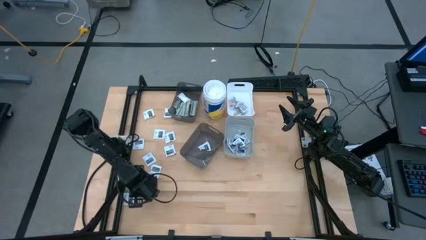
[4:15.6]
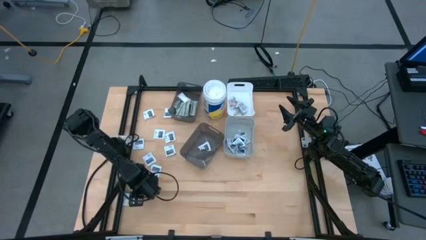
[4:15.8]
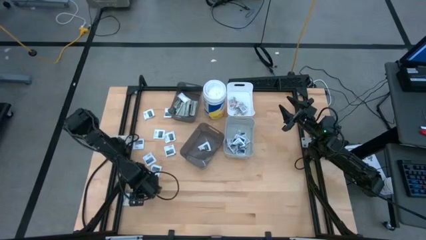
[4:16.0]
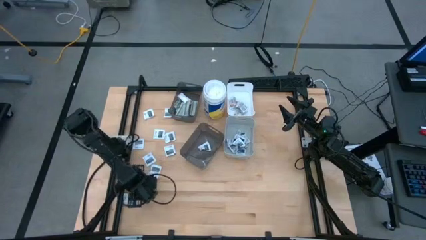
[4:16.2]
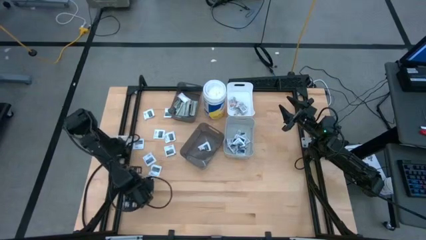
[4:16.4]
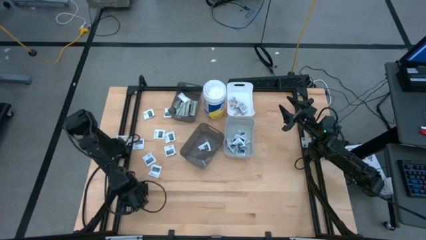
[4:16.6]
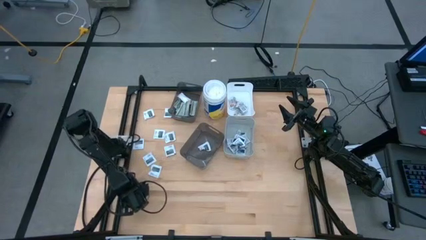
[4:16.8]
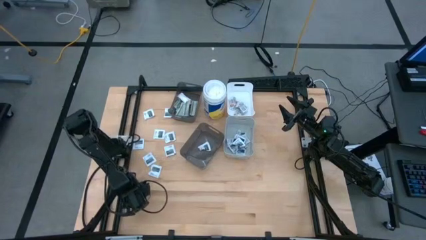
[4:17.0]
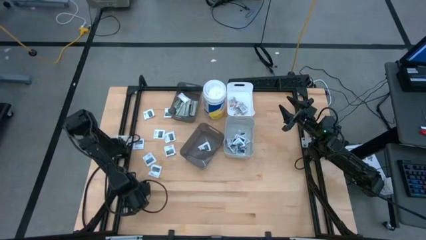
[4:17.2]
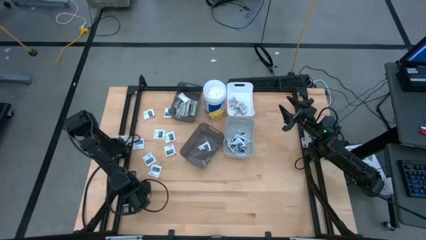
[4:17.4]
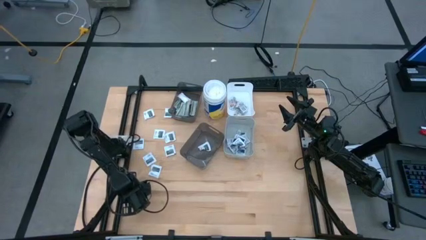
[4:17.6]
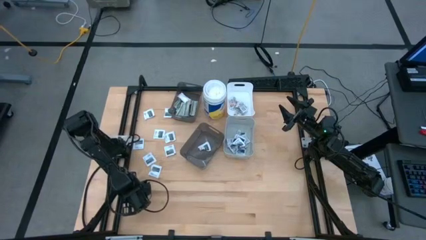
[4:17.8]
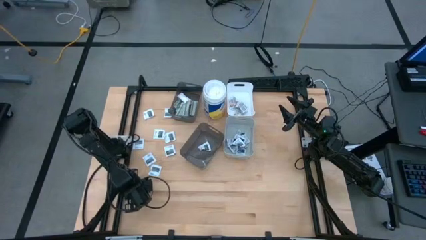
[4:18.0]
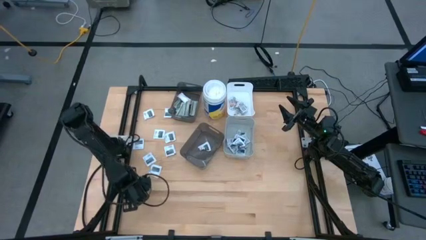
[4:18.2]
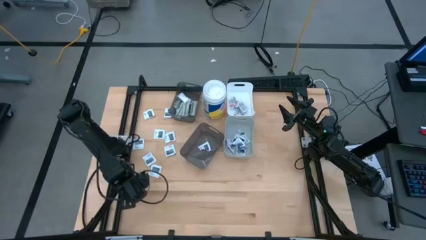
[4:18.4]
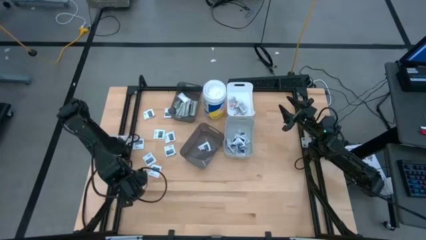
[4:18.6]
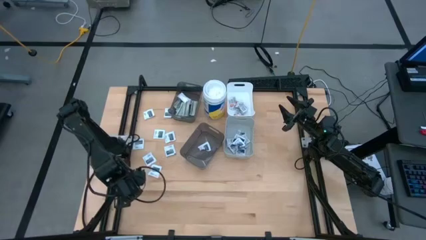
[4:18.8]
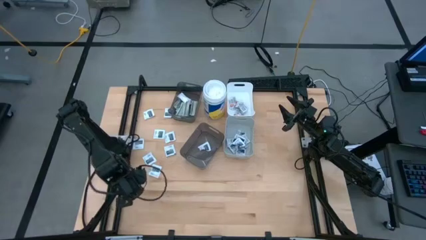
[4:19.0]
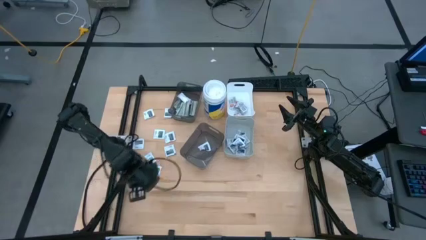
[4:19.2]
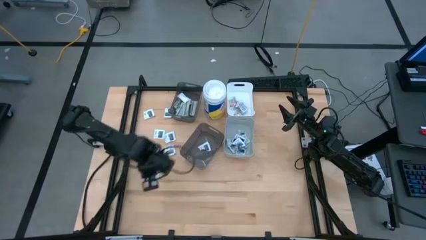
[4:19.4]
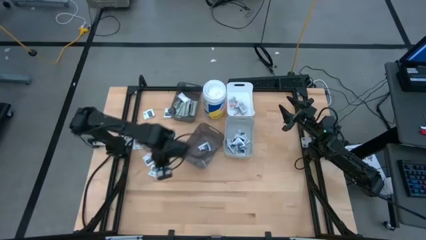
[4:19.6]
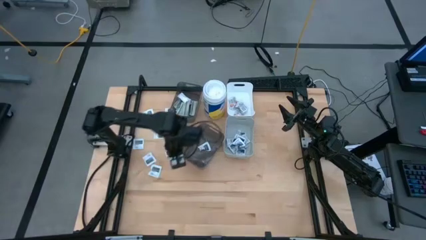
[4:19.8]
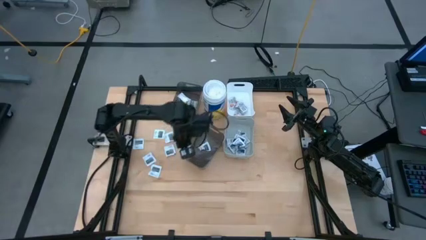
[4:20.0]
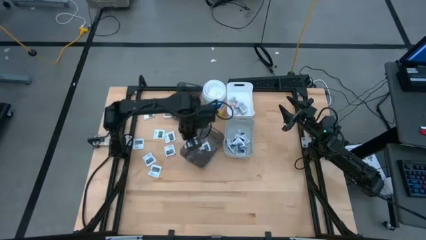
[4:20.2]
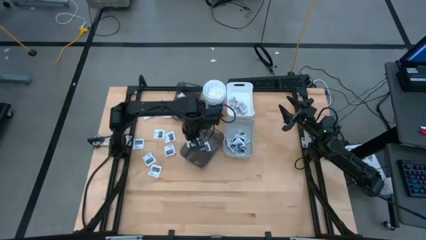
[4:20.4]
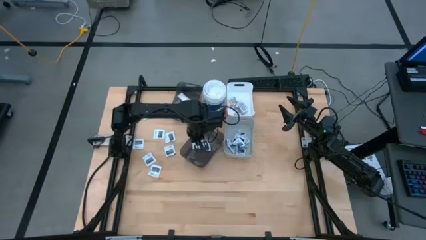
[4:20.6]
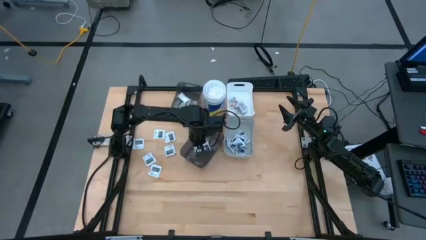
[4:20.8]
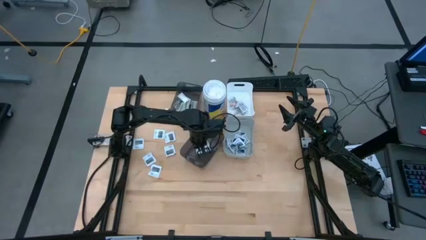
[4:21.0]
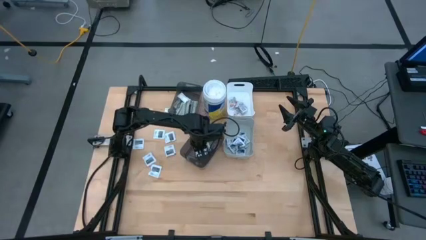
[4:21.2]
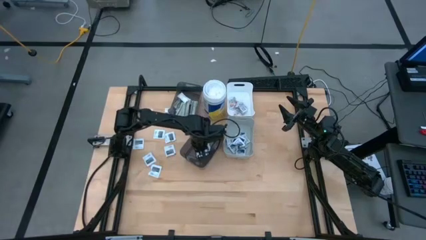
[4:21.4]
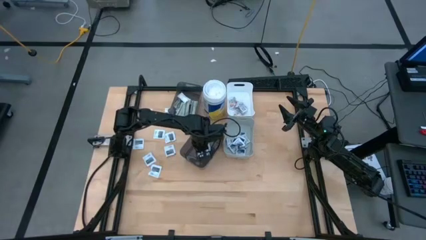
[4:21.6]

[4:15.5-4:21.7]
Task: Pick & Place First Aid Supplies
Put the towelette pack into the bottom black bin

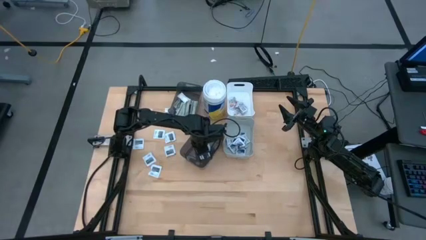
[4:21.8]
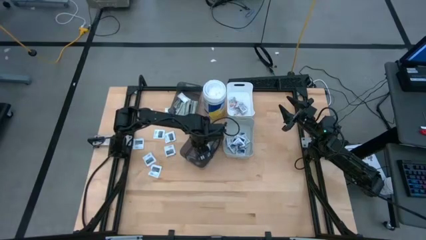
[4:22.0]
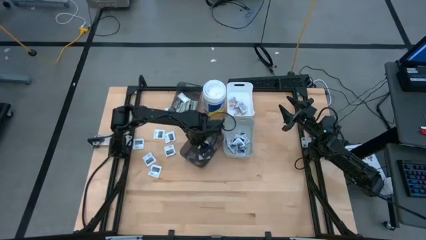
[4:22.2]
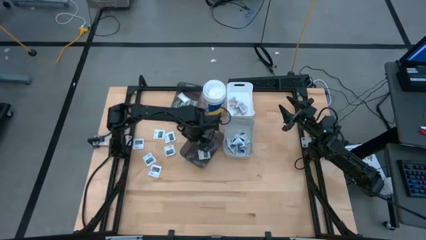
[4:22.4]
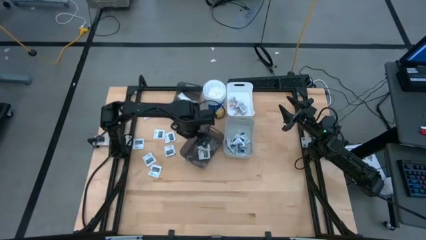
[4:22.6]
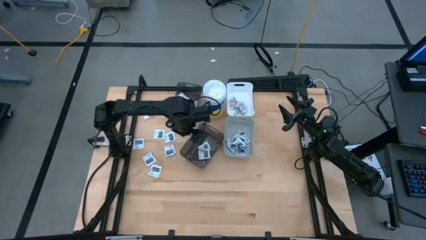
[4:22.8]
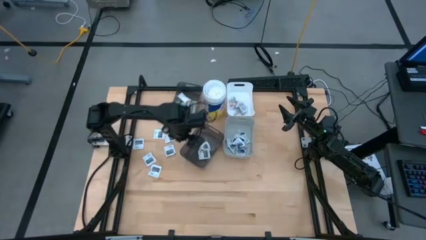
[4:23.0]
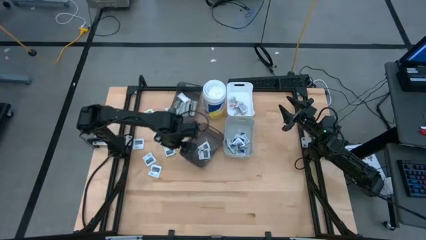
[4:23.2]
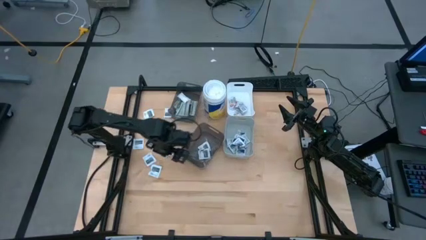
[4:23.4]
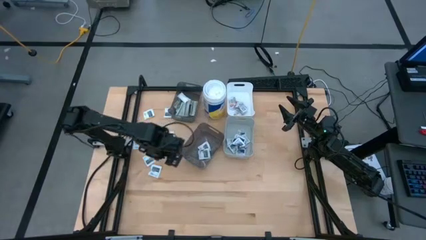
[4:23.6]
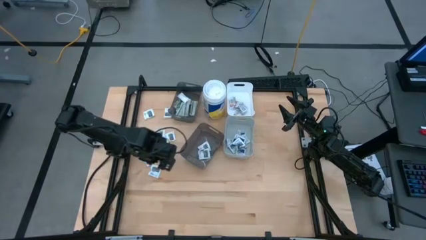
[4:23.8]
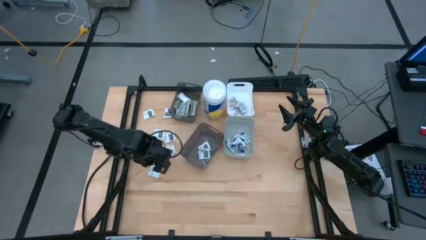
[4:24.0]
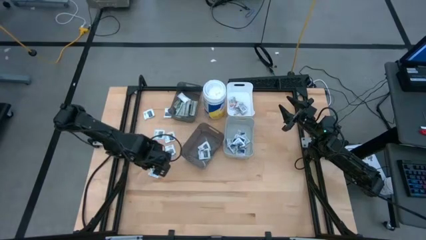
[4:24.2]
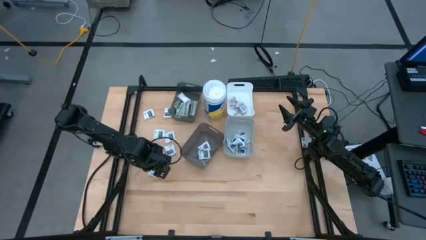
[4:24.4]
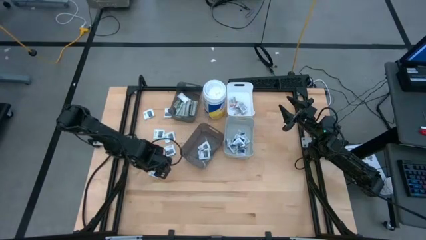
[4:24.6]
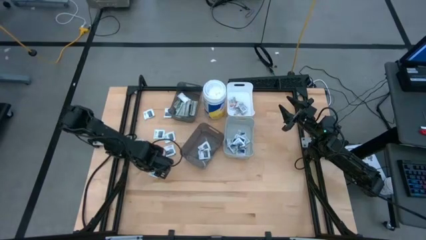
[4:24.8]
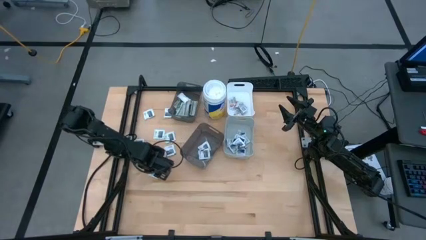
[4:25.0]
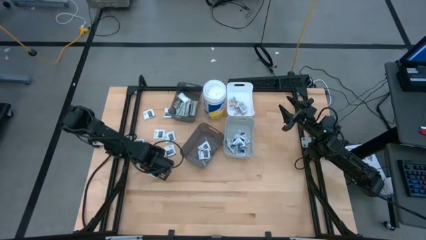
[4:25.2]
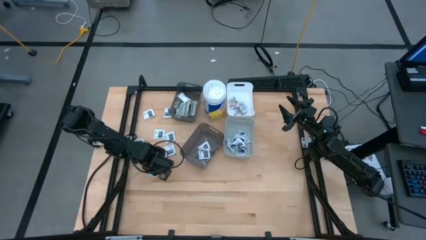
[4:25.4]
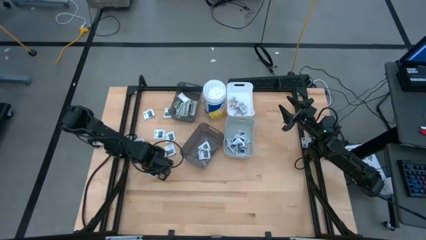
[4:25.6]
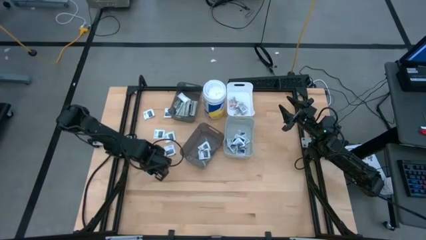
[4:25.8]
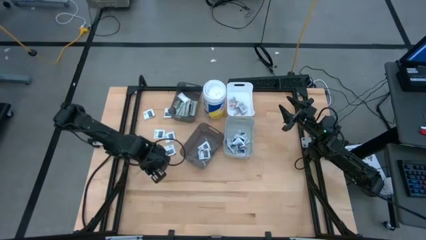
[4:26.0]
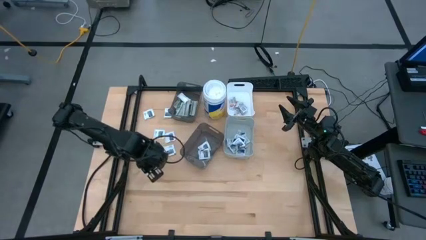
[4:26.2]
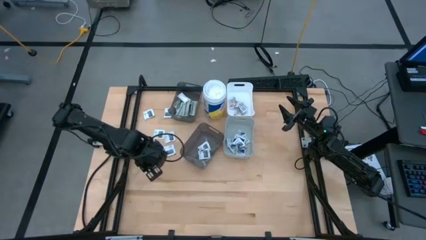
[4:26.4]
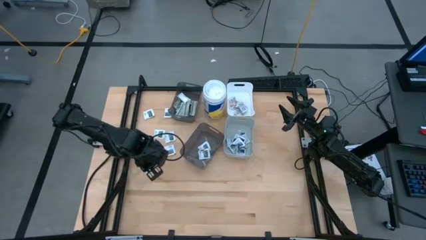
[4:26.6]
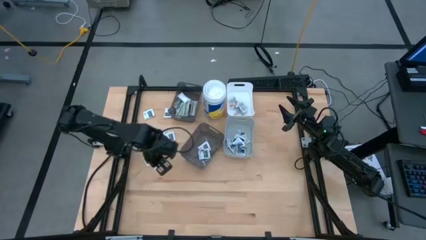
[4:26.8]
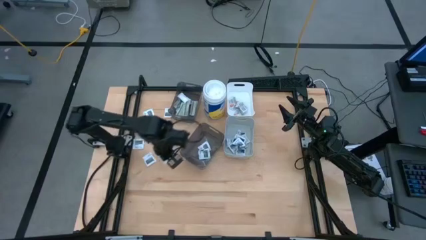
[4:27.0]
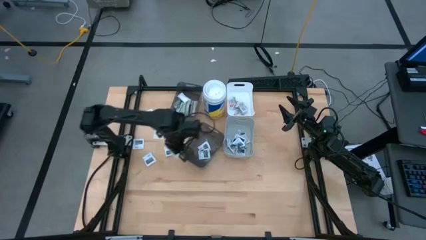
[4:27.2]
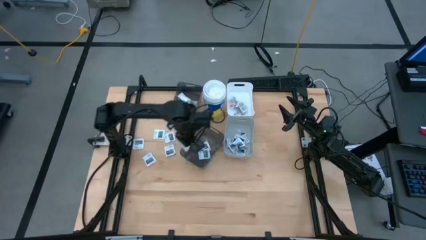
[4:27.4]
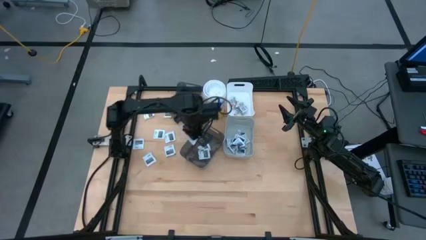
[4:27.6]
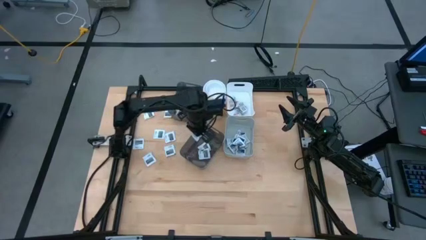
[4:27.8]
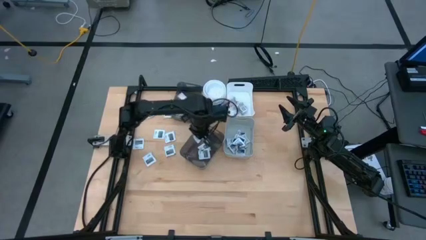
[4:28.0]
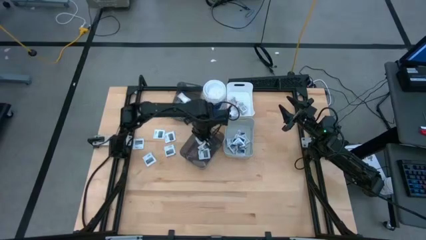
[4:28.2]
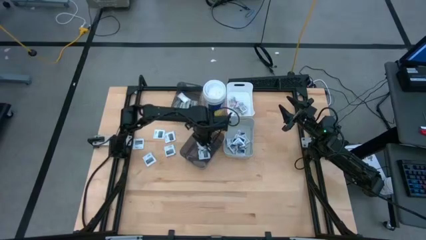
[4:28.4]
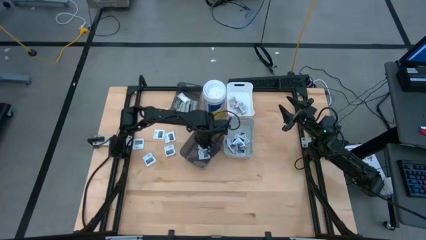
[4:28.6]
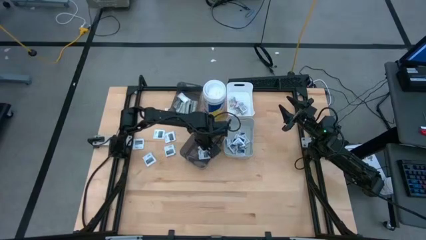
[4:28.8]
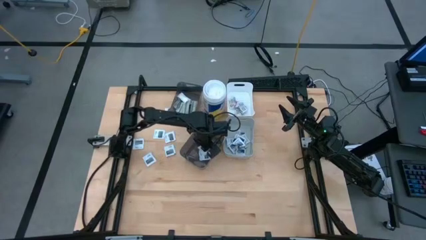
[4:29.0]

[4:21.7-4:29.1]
Put the towelette pack into the bottom black bin

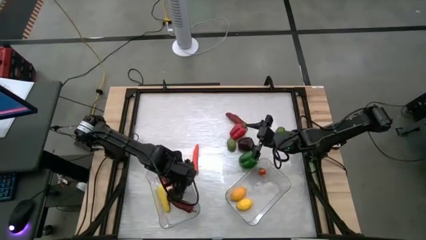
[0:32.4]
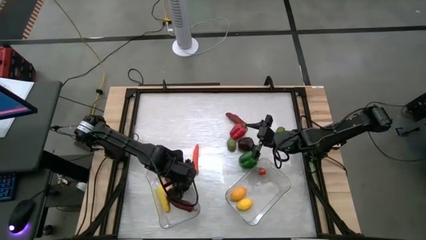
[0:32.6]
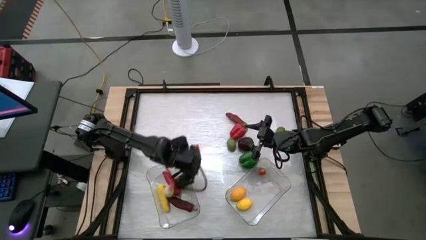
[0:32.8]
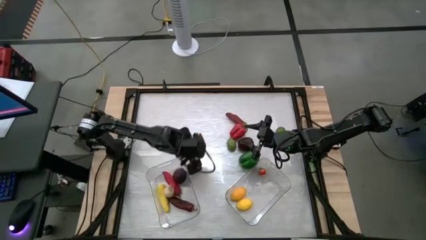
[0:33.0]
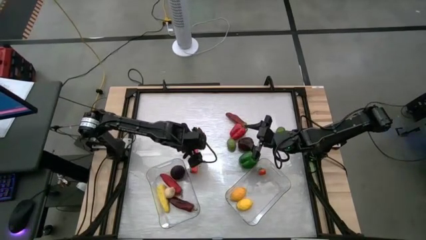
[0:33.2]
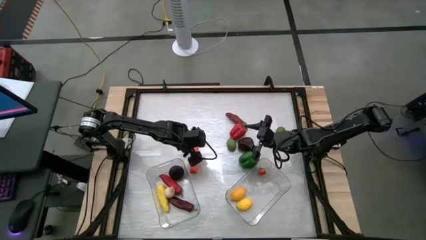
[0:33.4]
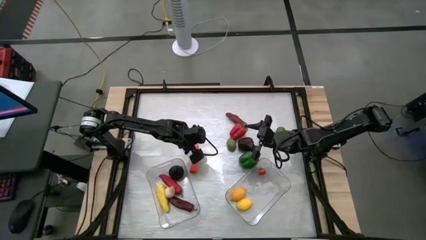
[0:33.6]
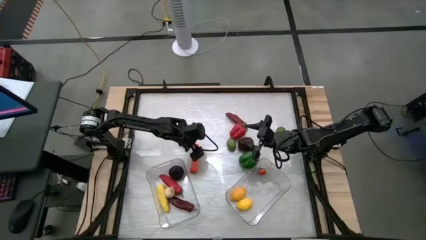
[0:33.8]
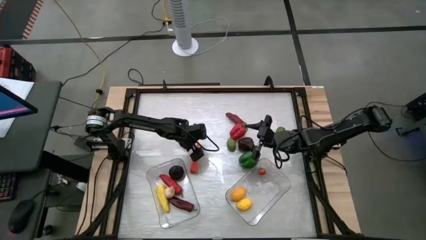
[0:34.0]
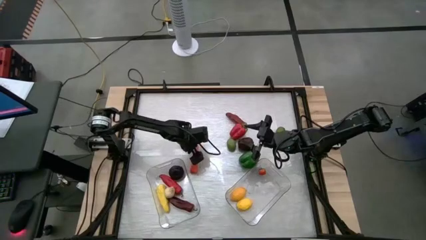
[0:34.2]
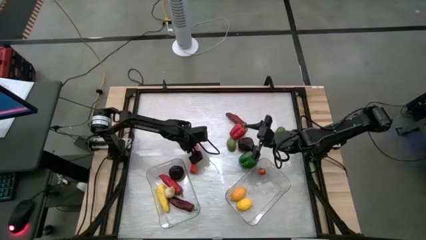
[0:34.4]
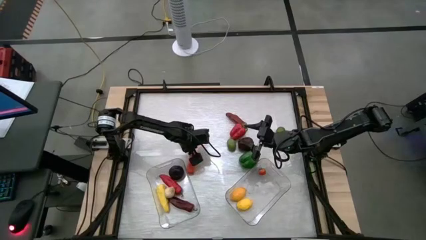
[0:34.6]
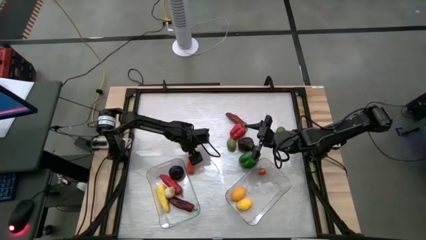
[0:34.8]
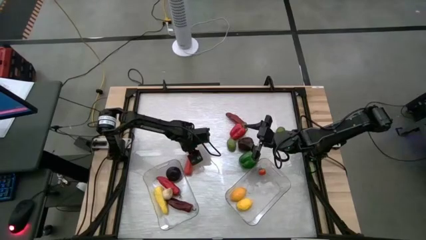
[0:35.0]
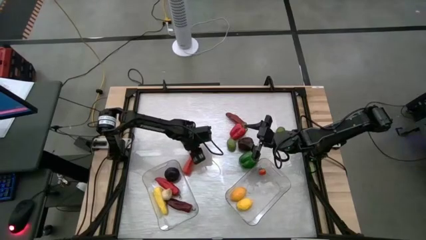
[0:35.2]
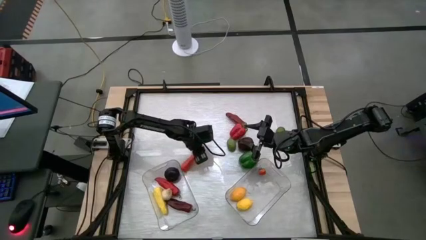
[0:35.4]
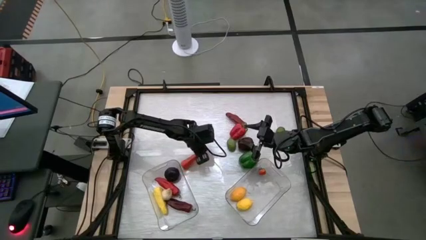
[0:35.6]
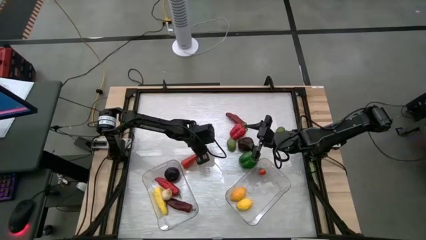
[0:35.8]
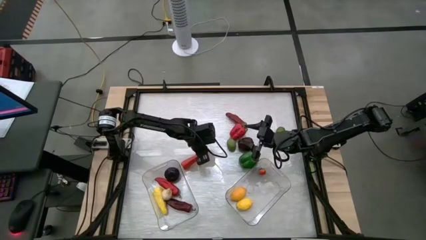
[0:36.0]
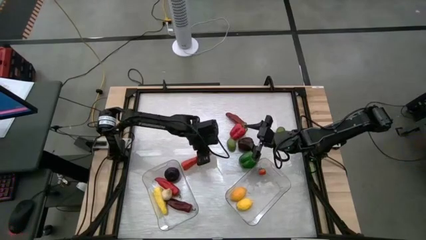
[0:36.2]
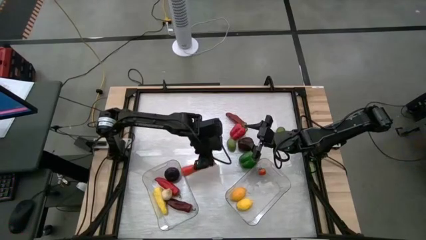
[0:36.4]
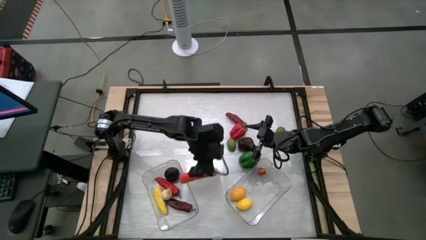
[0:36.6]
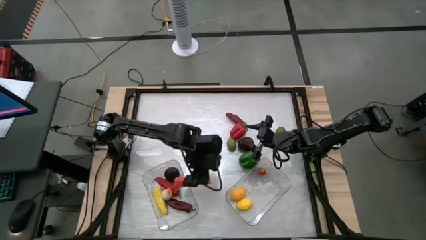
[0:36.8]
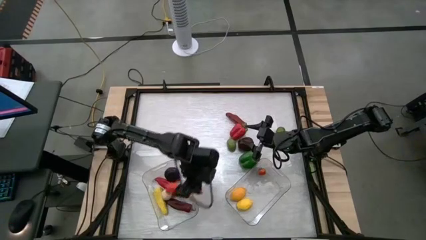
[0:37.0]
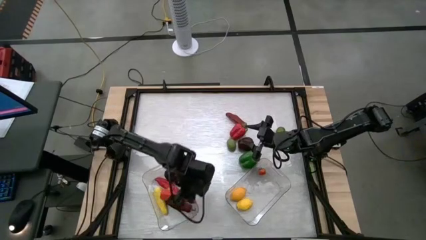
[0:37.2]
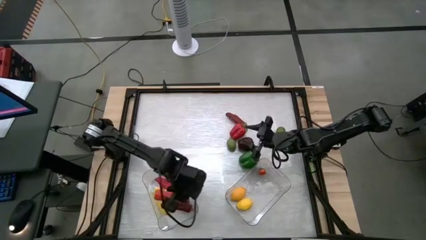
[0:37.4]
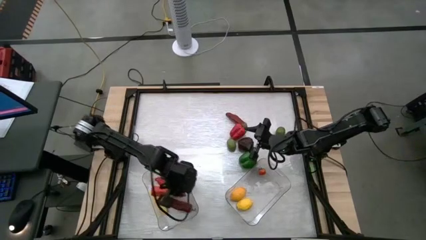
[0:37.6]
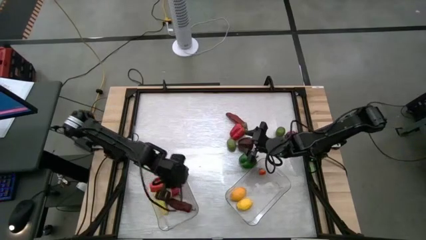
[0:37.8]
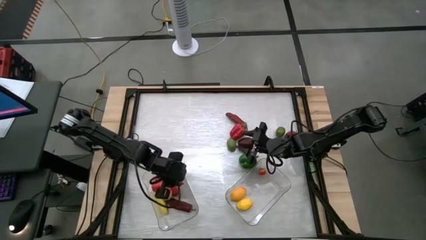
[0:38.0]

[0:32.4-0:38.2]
Task: Sort produce into baskets
Put the carrot into the left transparent bin
